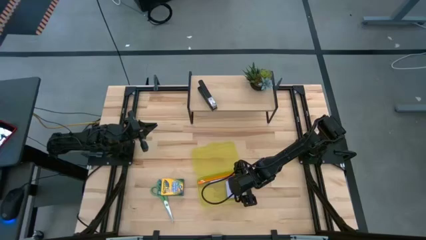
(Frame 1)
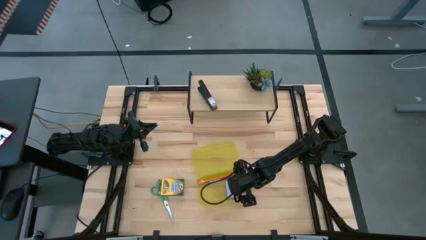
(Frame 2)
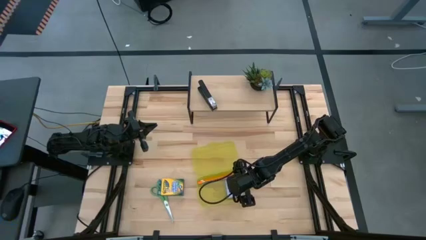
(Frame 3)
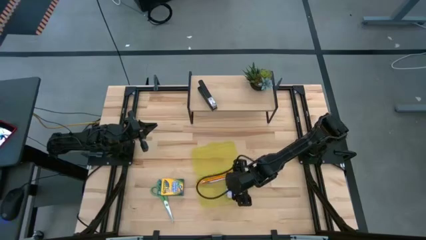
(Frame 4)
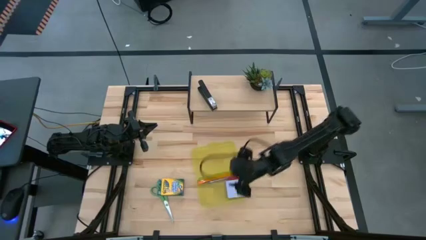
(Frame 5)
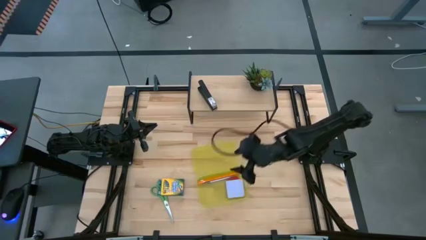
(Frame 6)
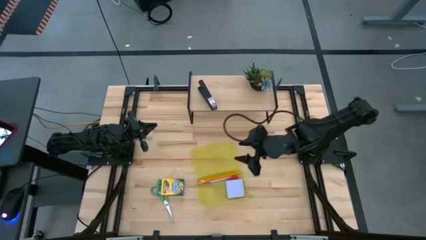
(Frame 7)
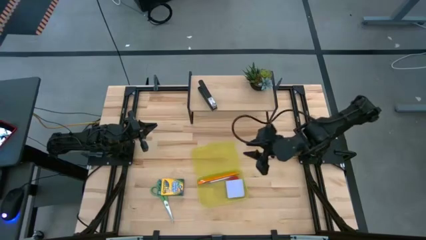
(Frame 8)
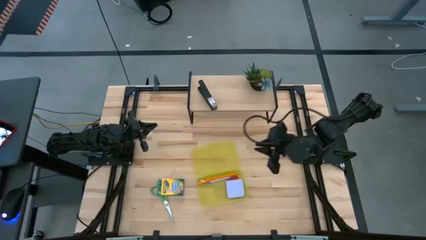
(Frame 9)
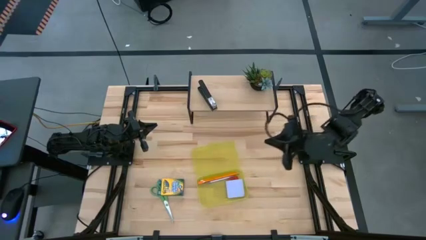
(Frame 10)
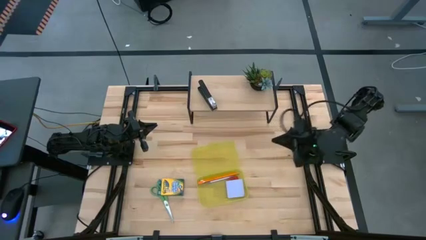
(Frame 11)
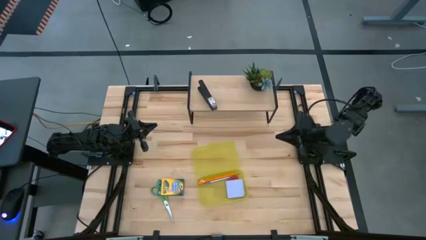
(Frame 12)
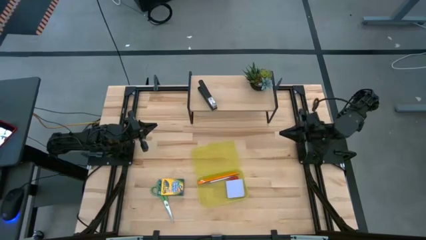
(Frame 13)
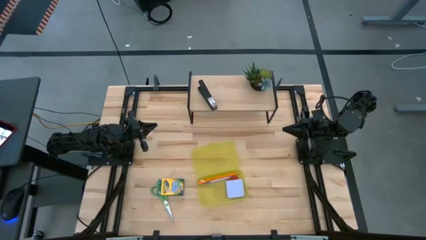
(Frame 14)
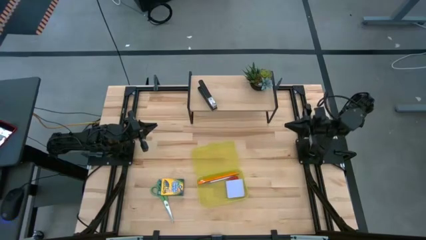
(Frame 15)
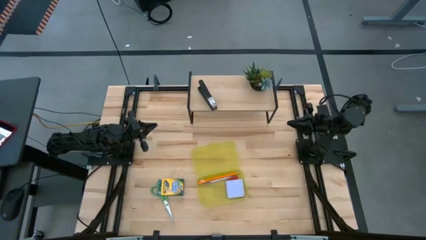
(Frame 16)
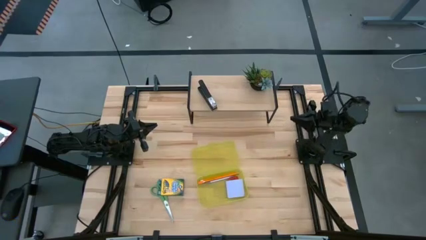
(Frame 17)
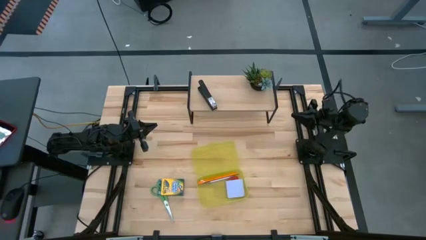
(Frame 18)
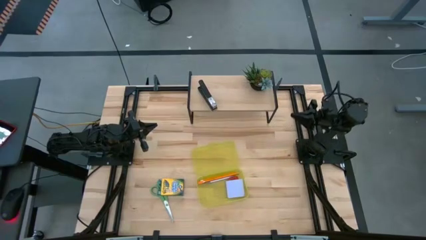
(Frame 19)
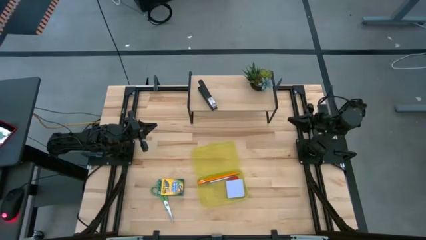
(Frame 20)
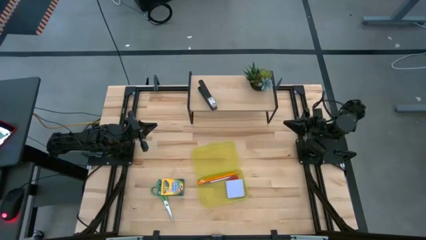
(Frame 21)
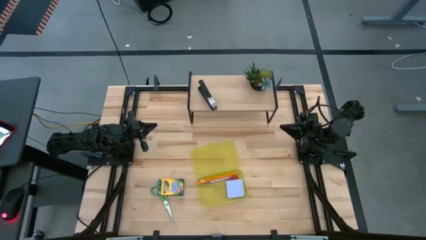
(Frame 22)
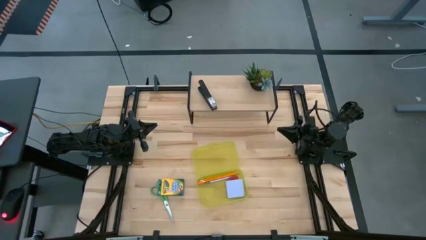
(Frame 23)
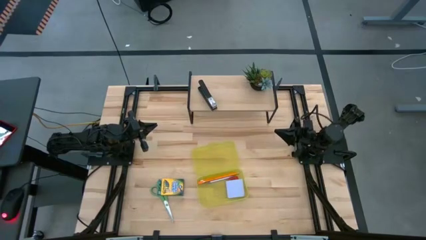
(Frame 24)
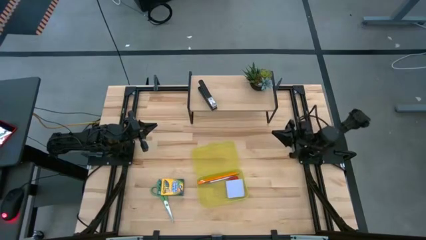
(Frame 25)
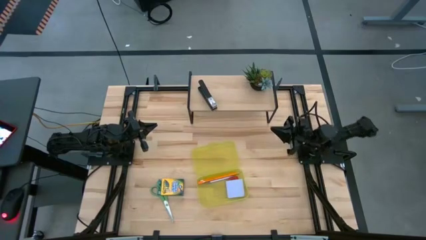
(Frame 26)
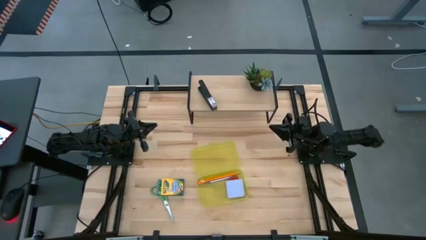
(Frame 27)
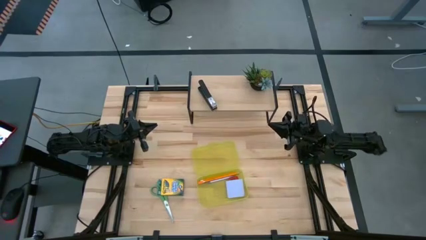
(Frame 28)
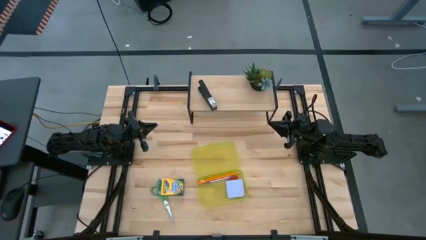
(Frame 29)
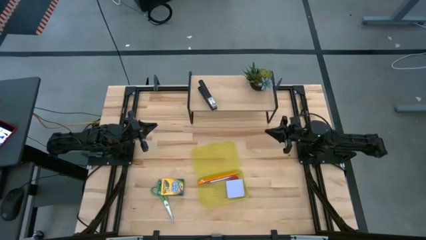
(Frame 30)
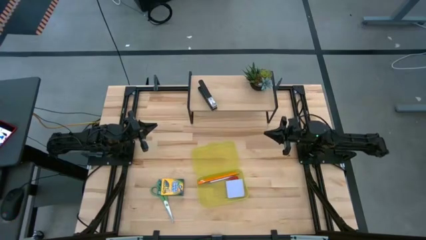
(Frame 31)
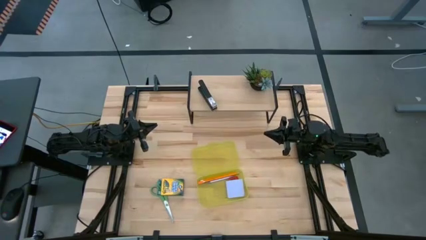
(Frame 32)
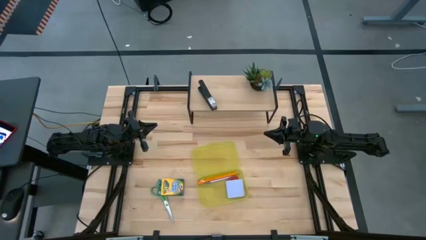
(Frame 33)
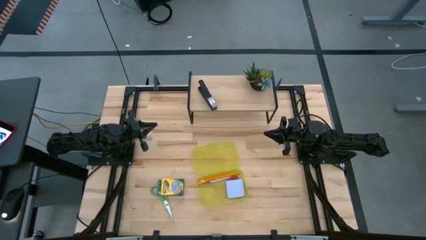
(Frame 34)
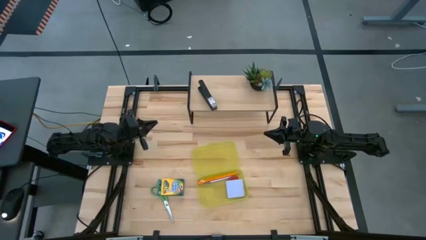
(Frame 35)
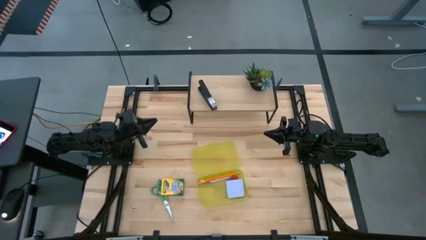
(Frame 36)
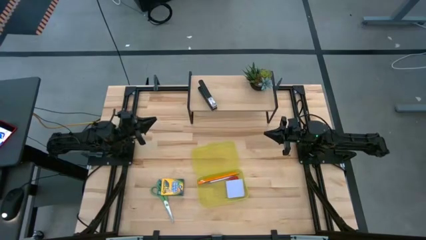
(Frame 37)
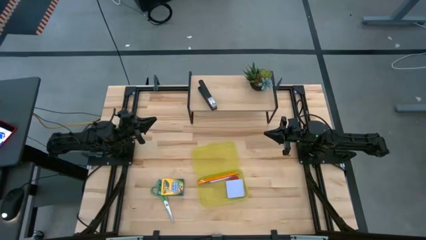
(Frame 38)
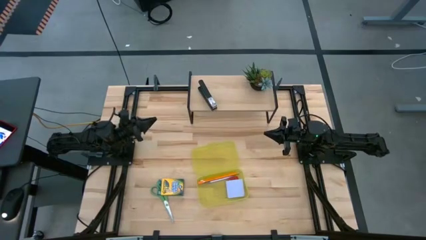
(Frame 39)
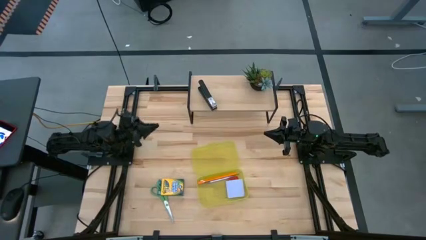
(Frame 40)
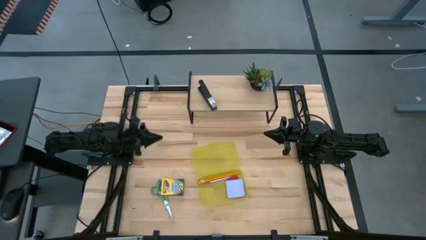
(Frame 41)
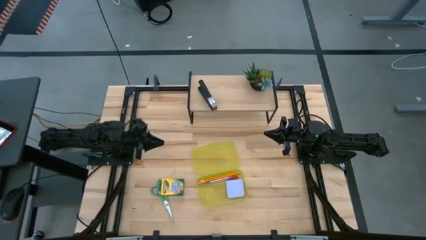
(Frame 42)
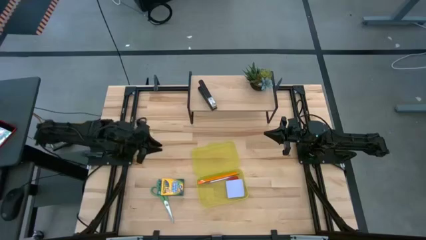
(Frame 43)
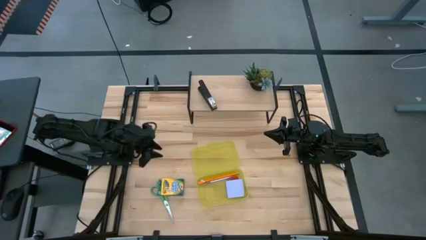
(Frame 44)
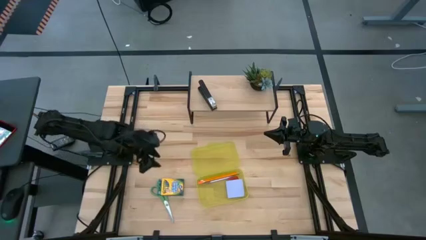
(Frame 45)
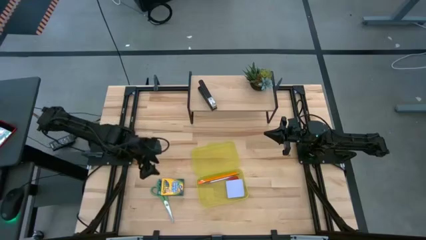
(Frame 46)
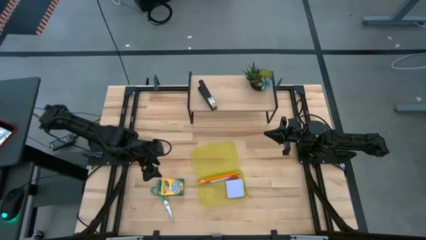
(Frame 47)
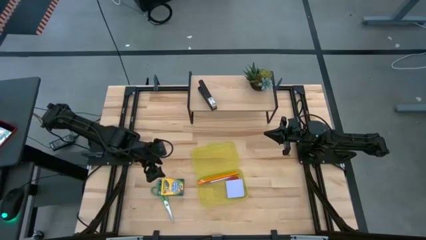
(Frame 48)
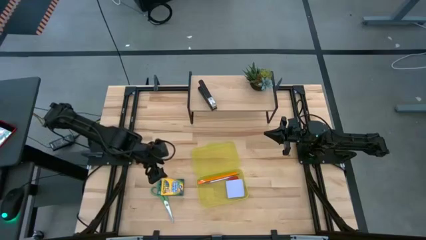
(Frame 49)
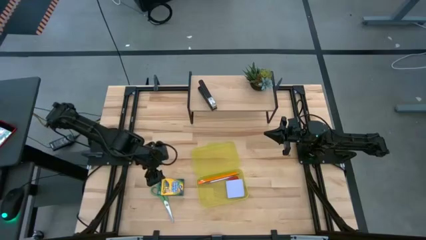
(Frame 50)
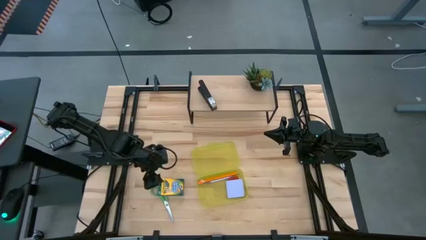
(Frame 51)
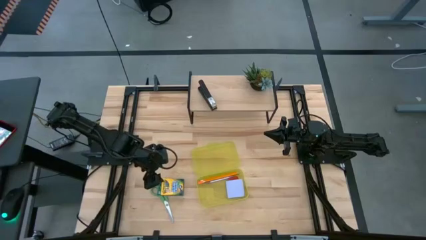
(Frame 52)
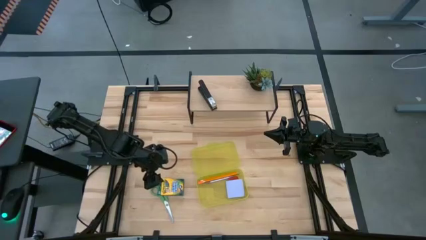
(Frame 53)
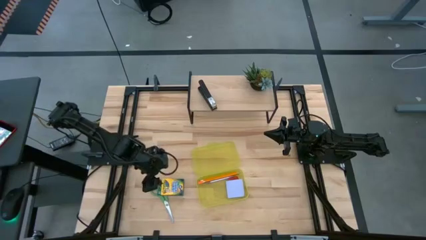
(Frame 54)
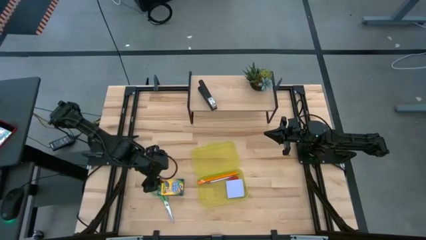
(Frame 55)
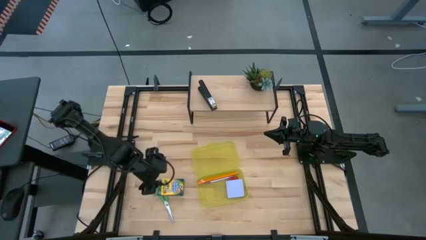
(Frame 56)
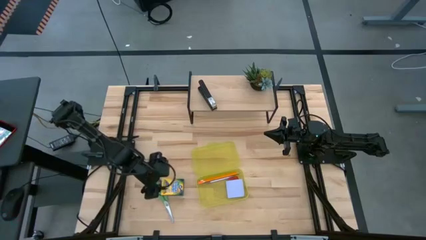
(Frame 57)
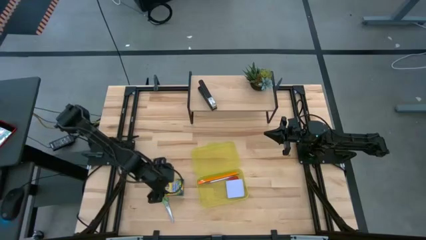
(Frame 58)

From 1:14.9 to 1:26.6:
Task: Pack school essentials
Put the yellow crayon box into the yellow supply box
